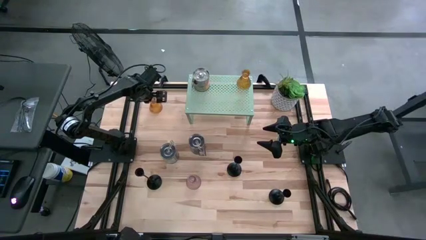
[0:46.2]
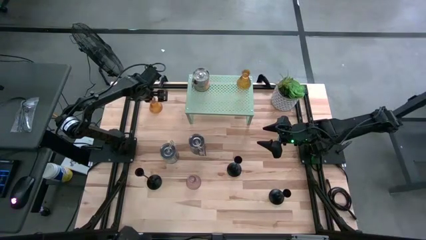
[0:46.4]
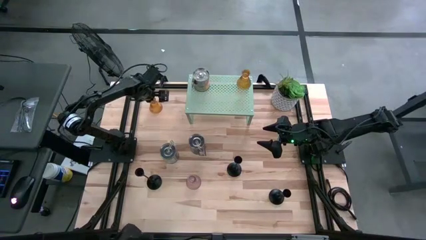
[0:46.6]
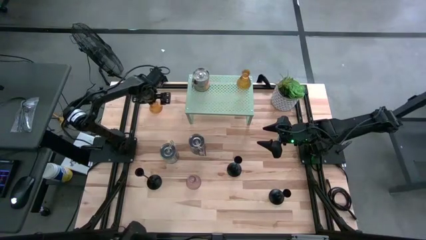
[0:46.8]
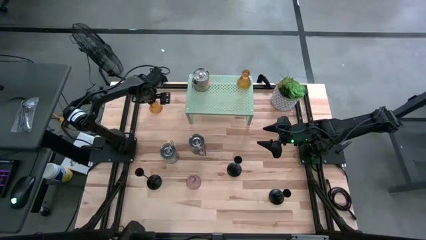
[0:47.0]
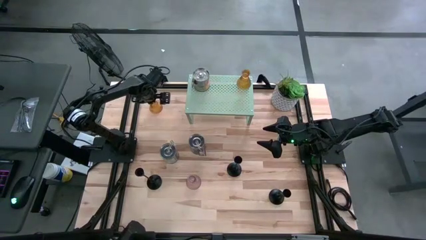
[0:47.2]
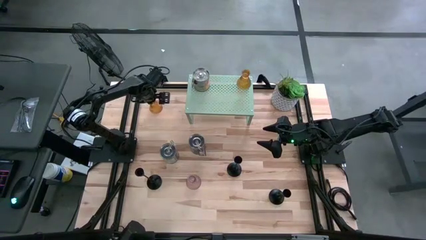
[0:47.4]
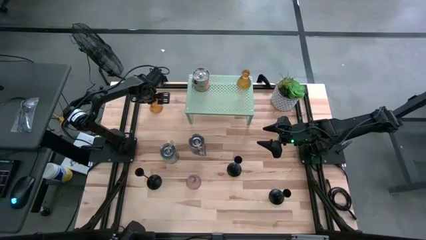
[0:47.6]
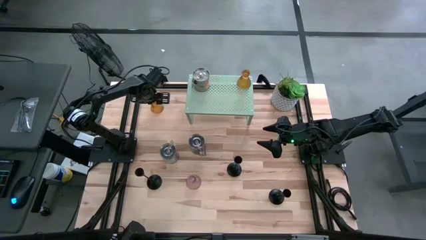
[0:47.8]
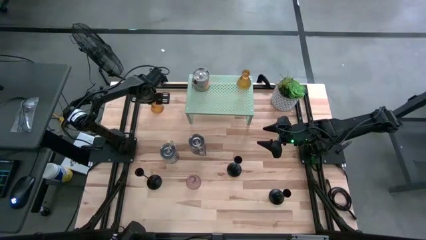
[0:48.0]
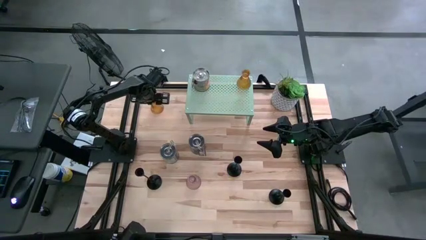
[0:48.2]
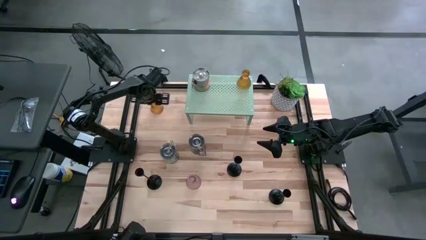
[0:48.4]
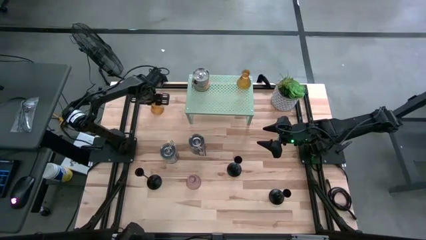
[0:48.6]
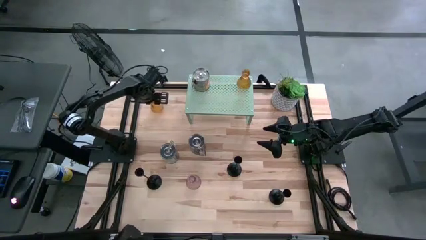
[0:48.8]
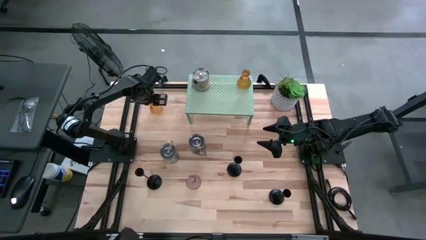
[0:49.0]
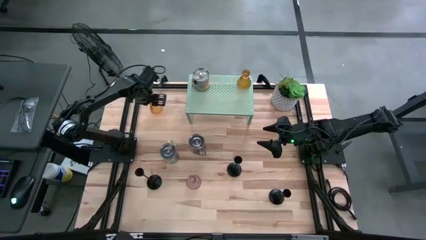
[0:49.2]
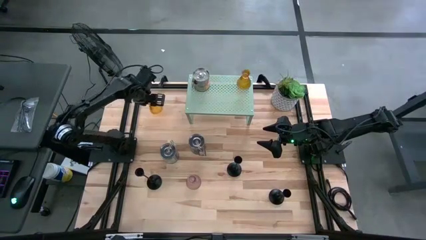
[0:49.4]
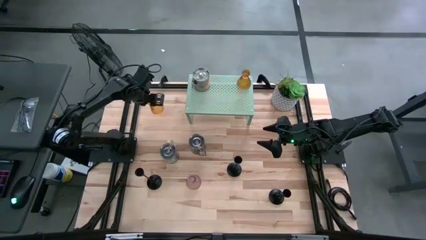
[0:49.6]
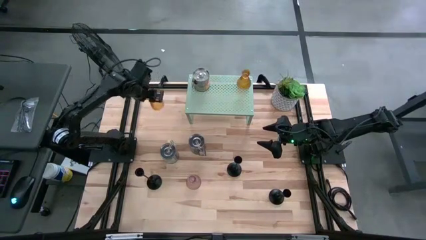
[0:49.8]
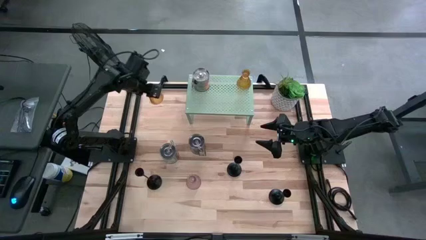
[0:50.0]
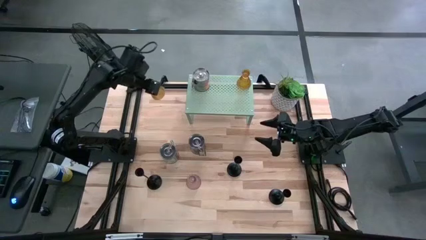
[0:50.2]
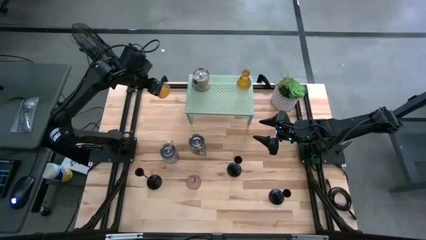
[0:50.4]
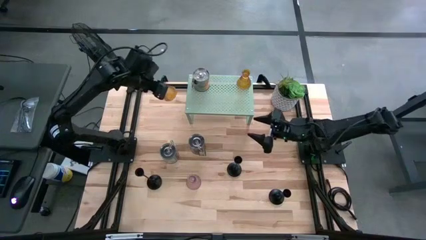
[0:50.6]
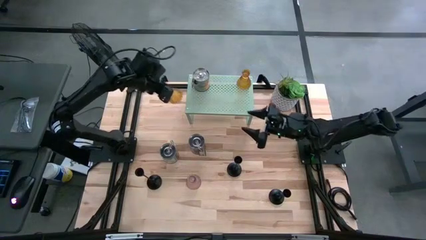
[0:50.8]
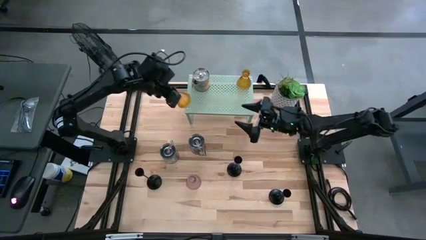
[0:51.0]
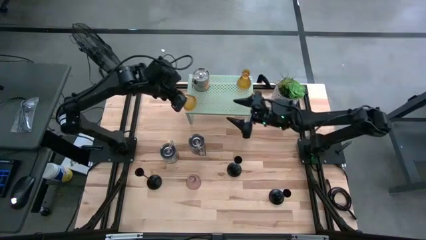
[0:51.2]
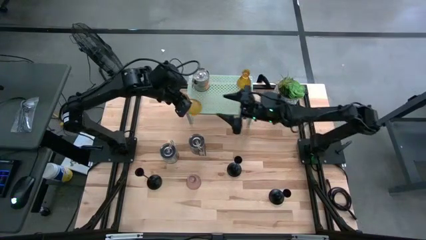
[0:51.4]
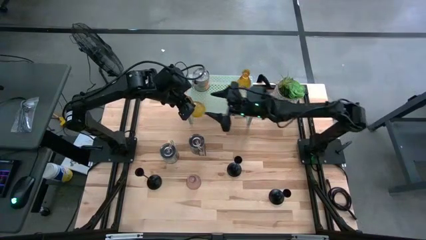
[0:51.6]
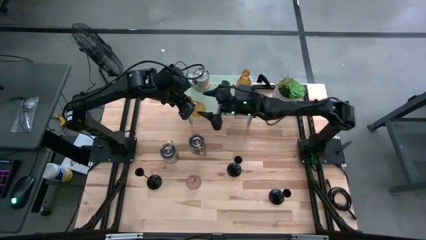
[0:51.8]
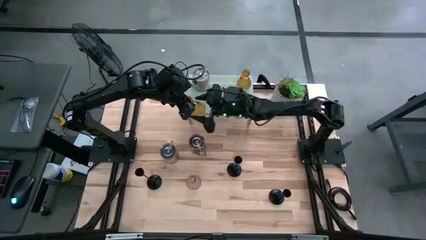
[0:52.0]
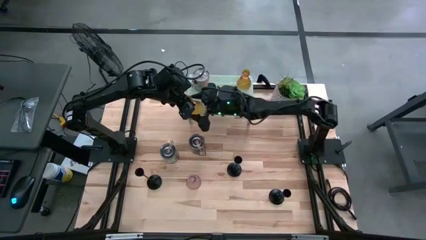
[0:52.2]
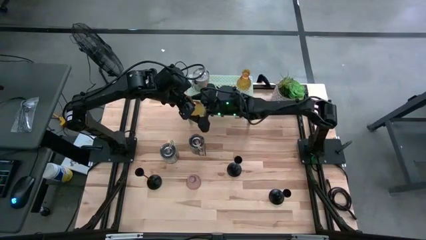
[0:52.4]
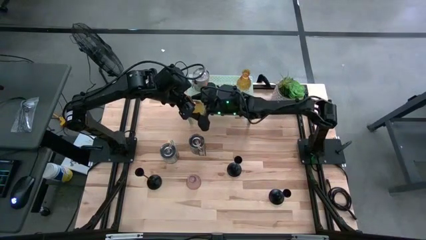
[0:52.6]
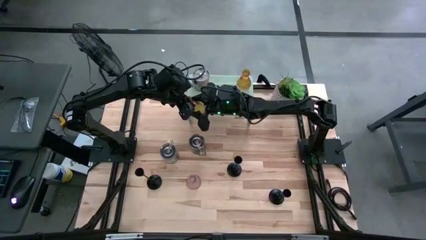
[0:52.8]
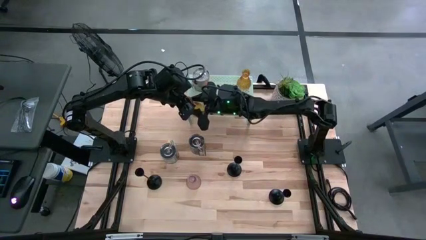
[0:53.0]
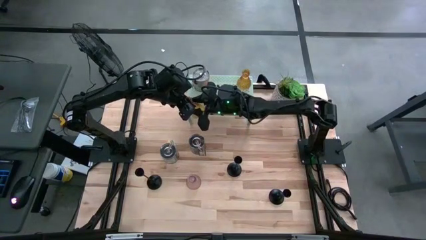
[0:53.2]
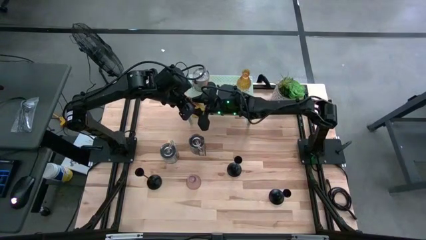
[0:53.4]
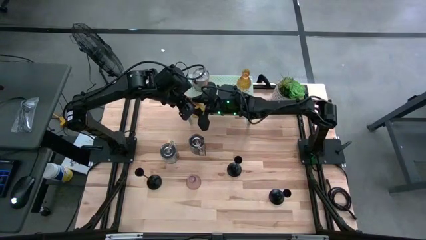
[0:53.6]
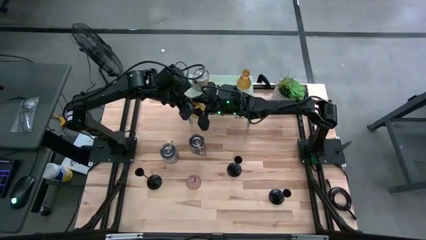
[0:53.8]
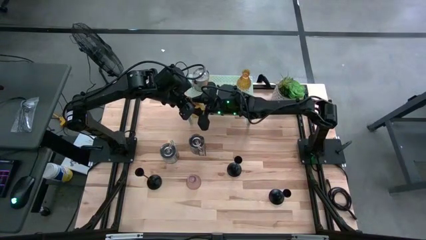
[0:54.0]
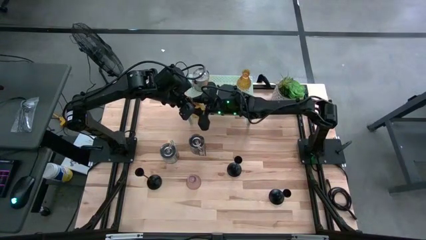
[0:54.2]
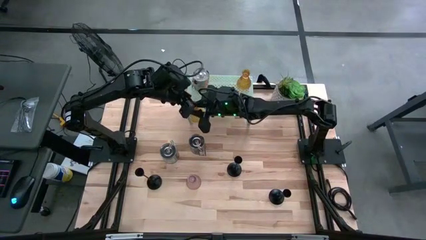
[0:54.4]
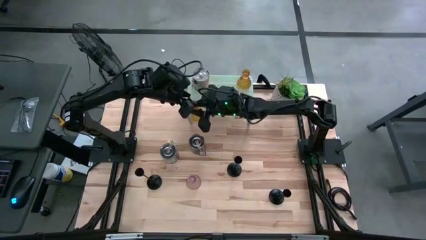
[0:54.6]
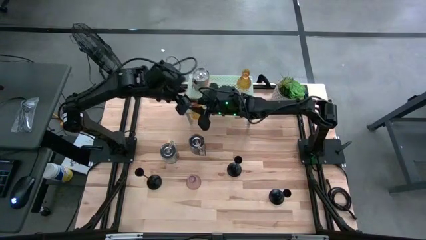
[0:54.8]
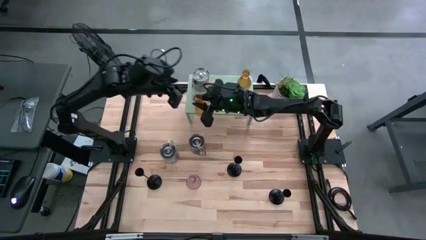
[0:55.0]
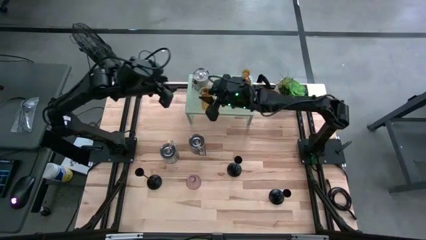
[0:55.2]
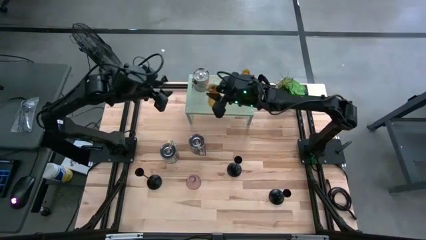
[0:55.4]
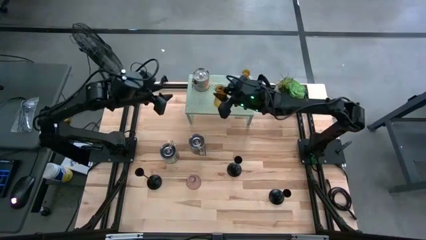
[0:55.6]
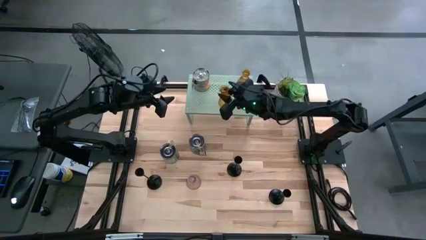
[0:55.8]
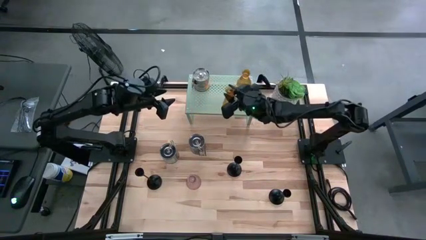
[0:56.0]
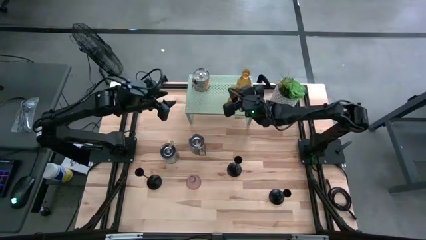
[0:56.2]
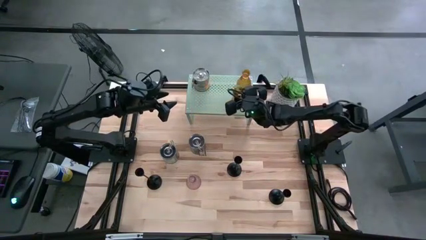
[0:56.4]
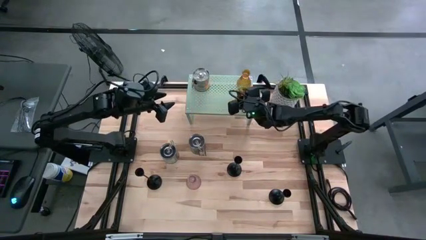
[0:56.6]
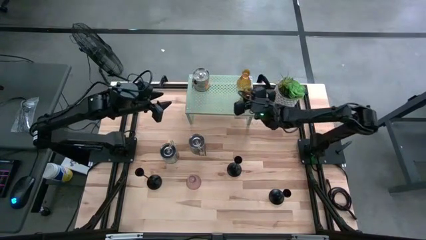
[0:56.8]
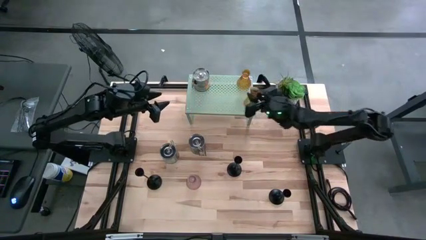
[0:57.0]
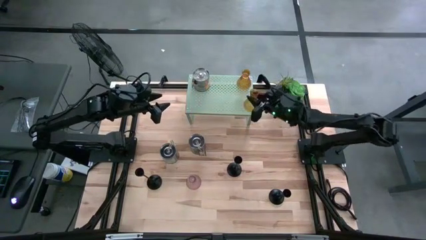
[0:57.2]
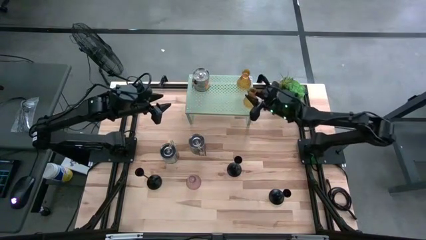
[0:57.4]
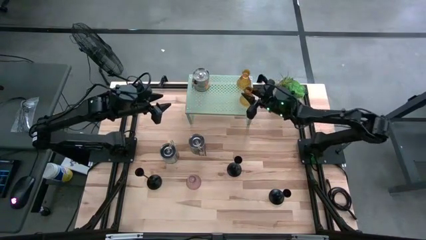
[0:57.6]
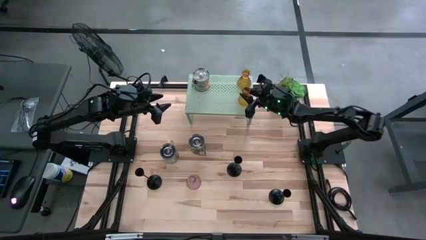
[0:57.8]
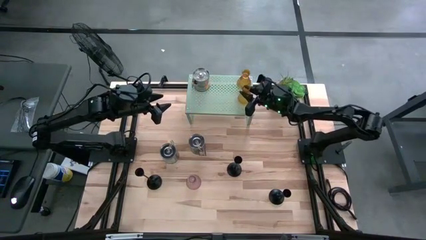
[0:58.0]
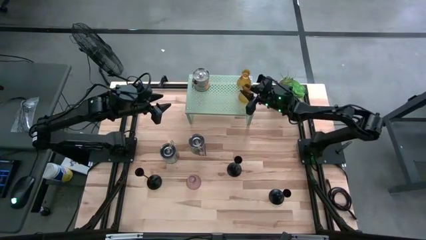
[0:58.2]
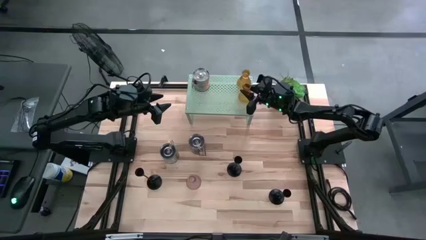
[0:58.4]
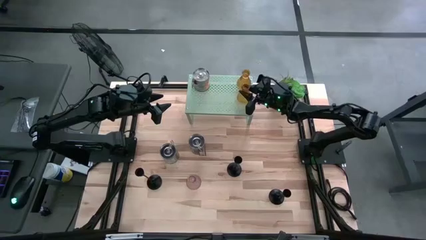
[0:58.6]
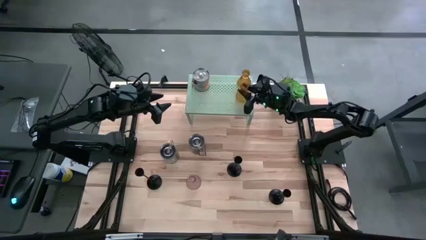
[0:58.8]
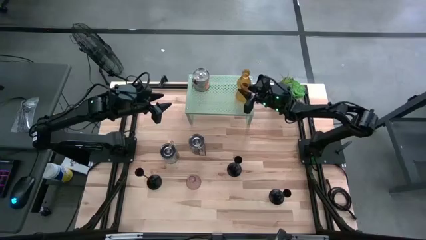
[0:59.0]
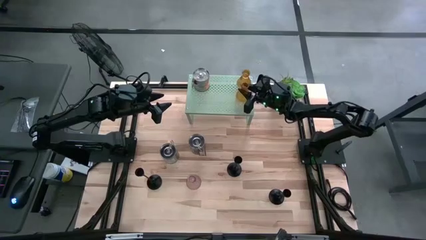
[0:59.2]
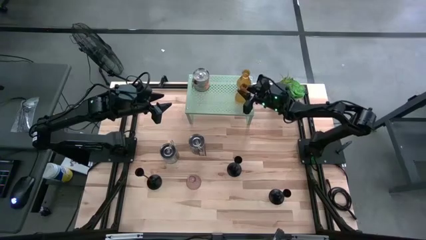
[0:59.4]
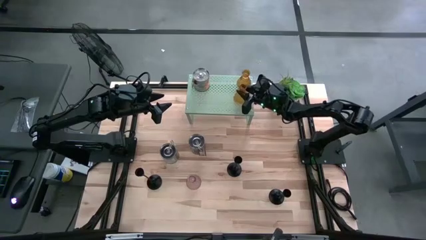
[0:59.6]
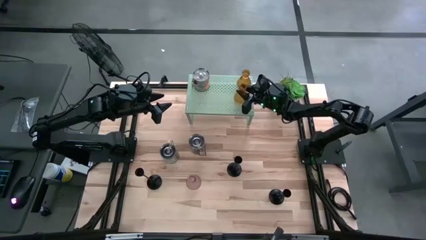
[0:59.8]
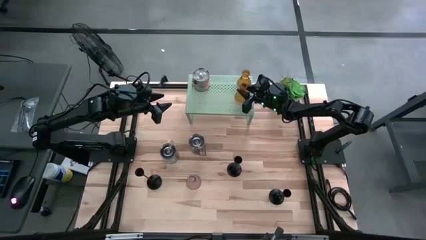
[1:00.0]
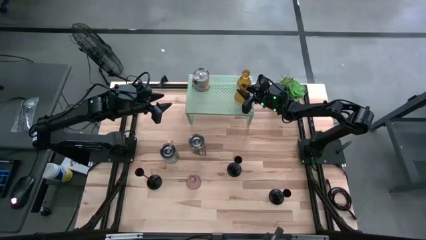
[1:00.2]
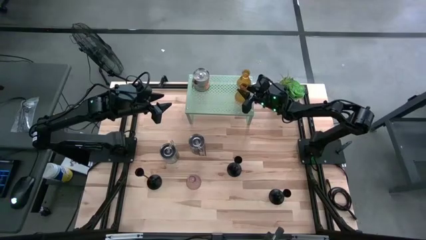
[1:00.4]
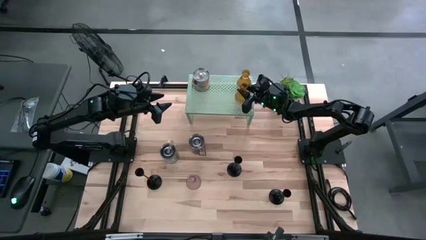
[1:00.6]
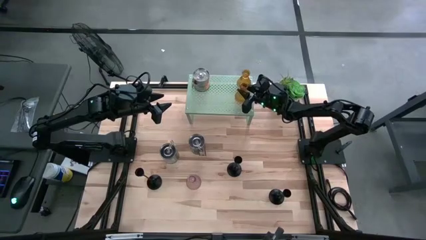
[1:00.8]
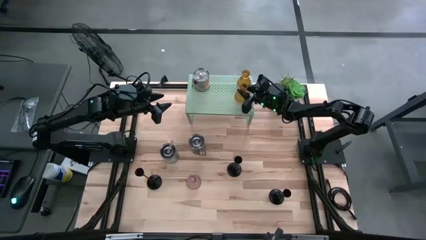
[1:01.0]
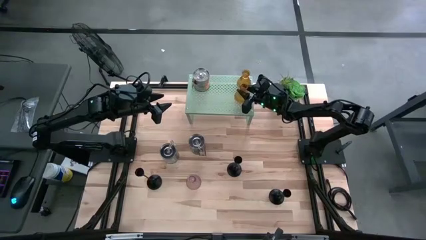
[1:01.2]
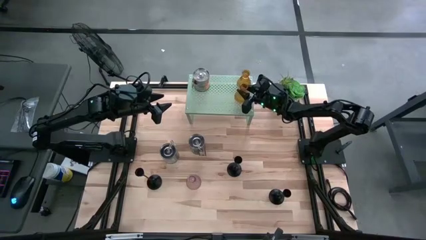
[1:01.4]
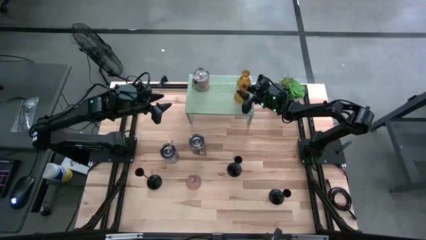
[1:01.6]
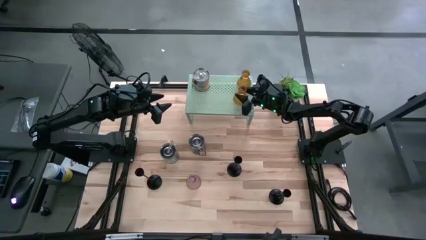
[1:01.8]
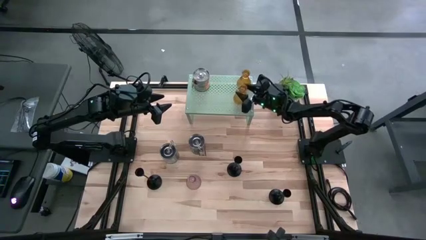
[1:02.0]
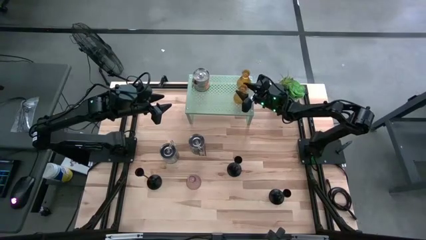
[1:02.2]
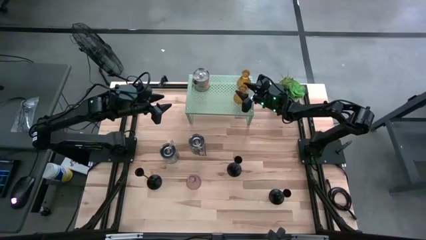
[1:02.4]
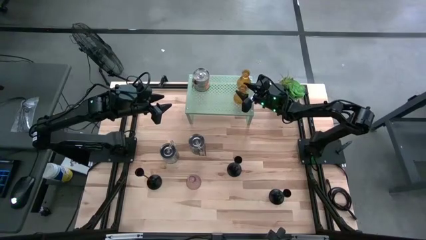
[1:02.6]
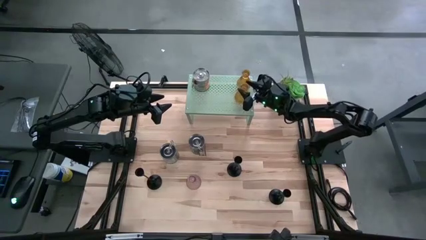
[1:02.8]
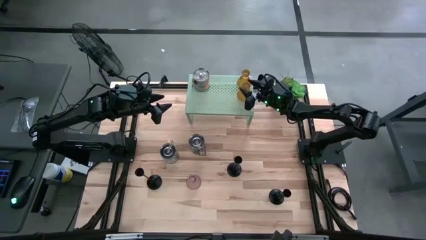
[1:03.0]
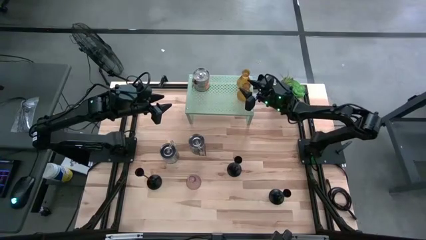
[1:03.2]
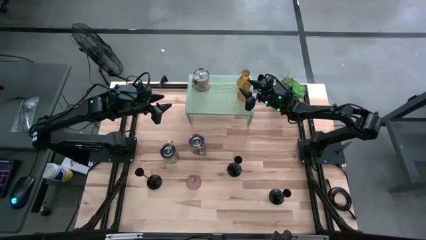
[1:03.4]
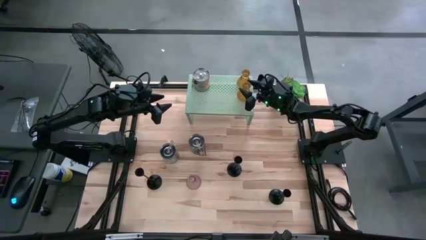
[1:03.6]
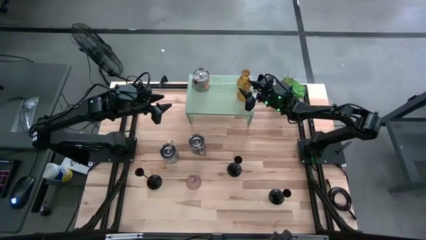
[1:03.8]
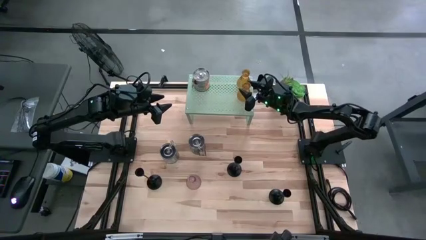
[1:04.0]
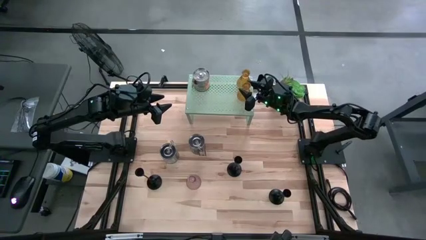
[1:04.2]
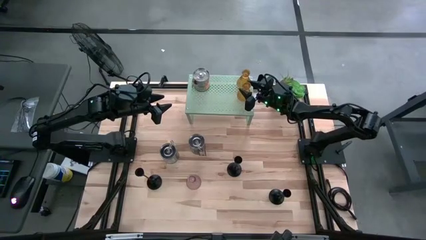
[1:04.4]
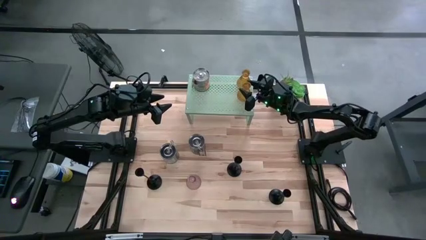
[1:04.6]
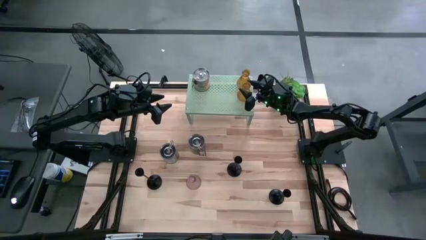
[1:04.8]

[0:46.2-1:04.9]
Task: Pick & Place candle stick holders
Put the orange candle holder on the shelf
